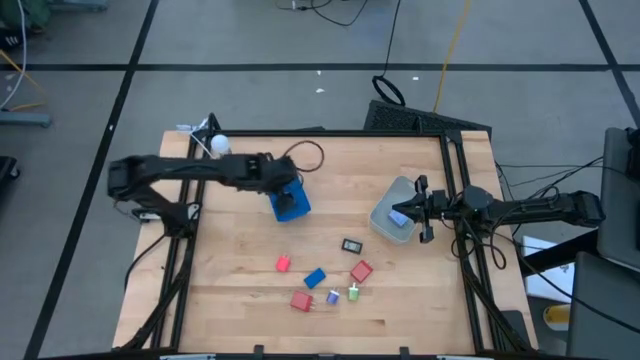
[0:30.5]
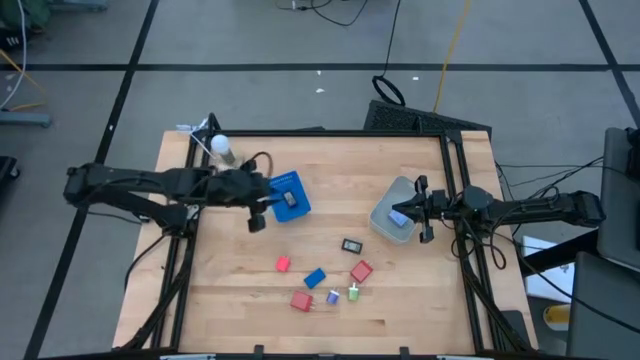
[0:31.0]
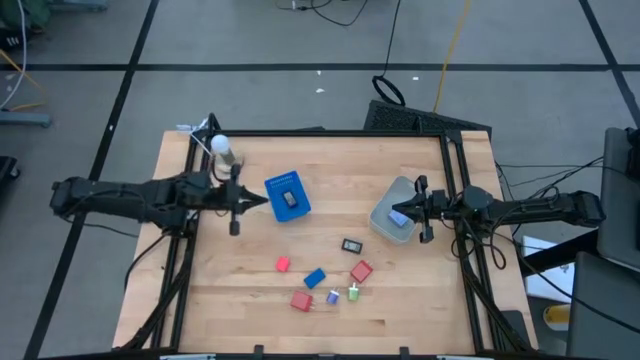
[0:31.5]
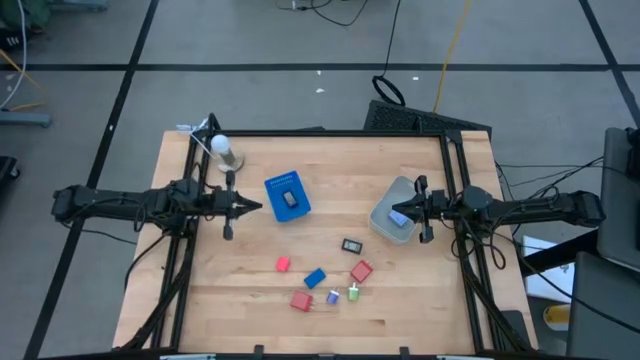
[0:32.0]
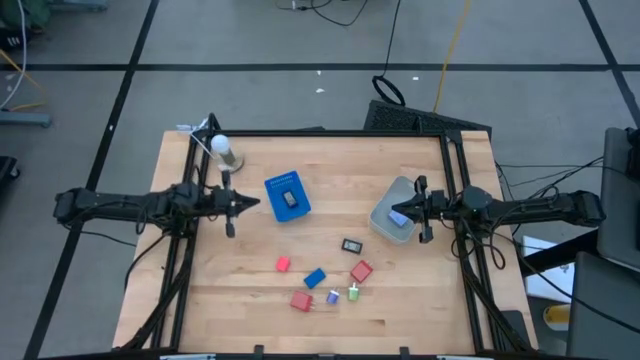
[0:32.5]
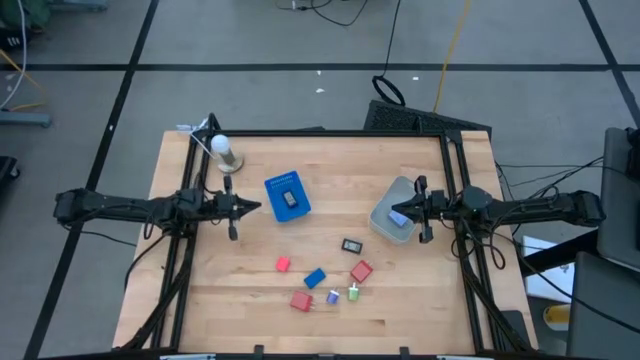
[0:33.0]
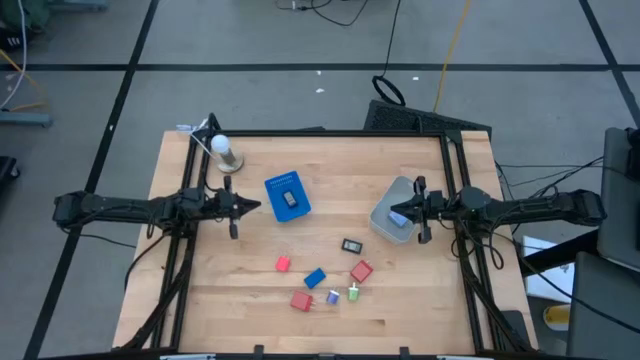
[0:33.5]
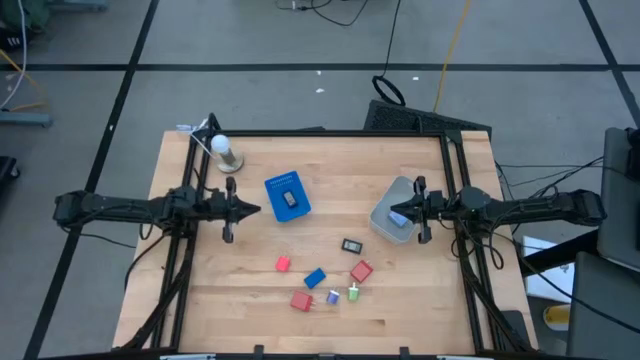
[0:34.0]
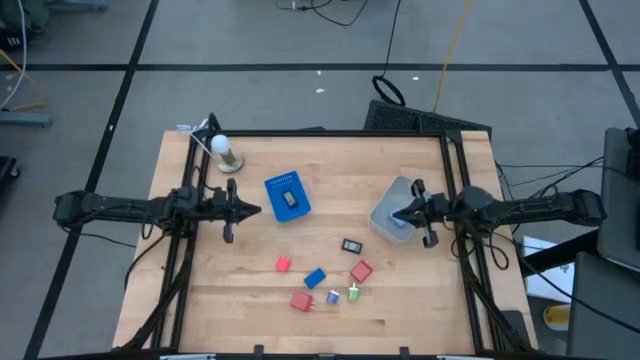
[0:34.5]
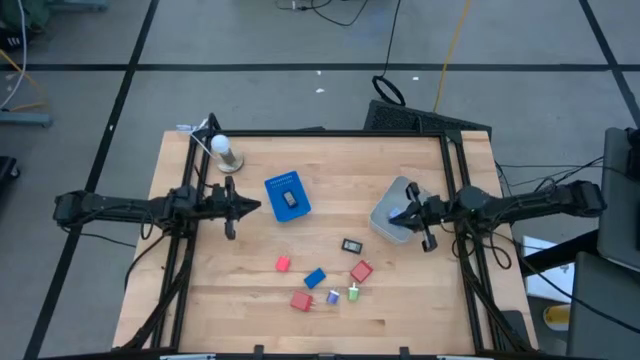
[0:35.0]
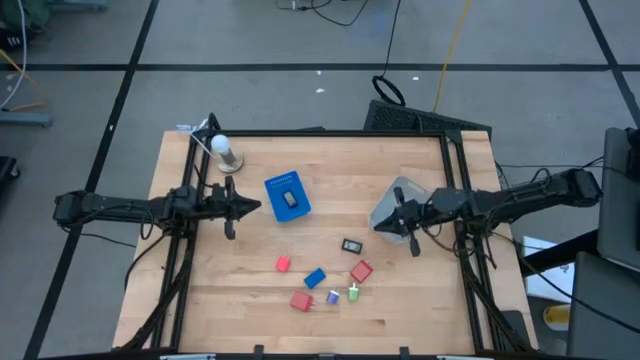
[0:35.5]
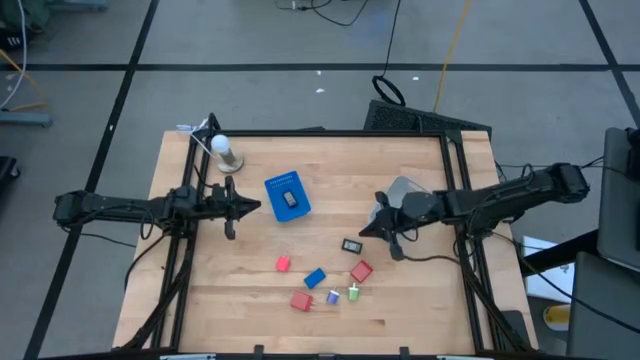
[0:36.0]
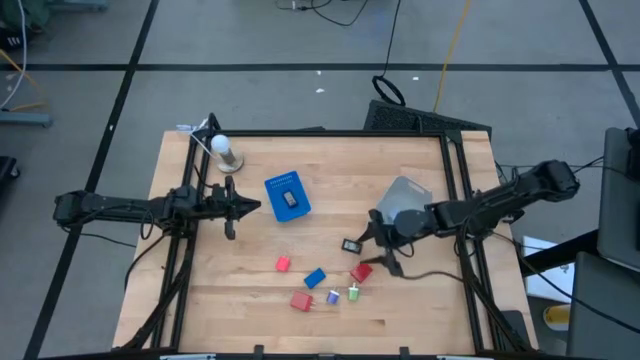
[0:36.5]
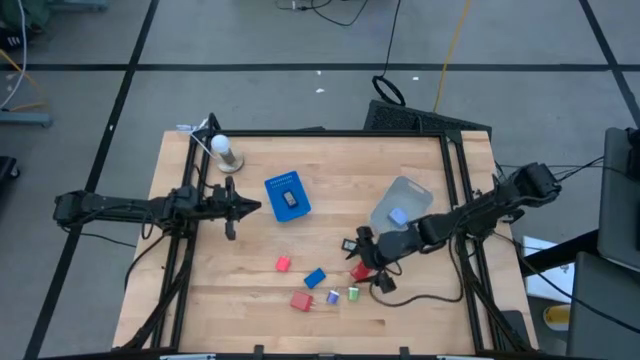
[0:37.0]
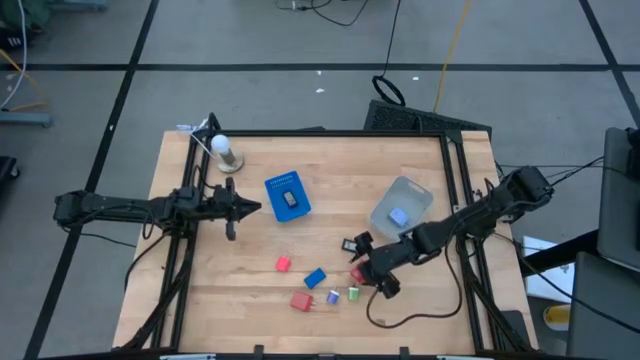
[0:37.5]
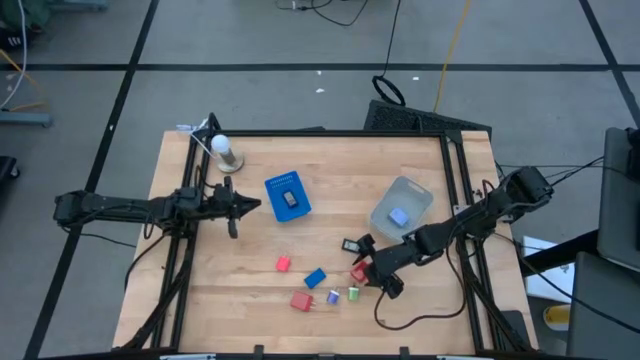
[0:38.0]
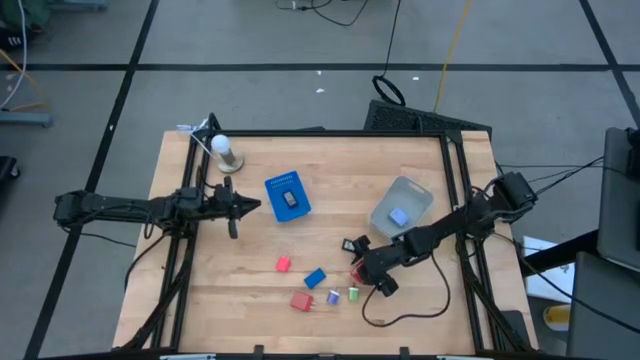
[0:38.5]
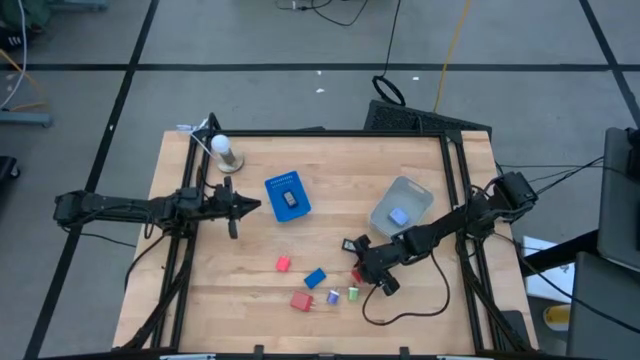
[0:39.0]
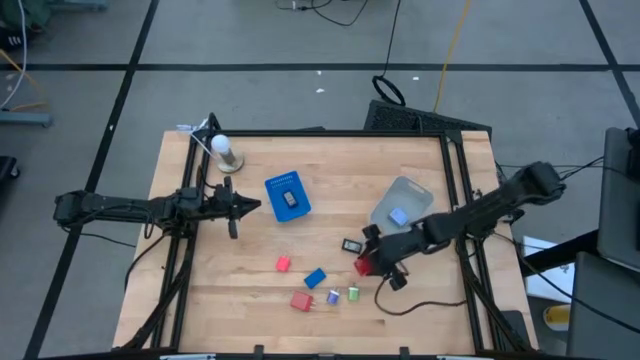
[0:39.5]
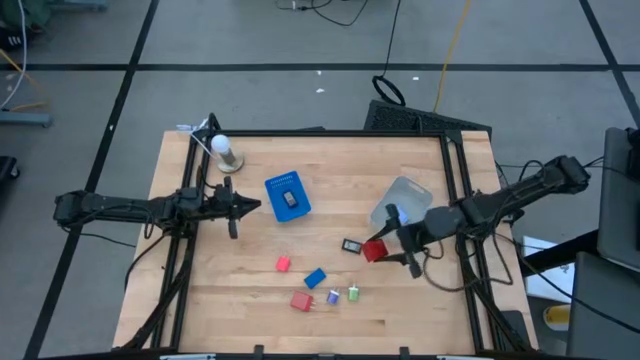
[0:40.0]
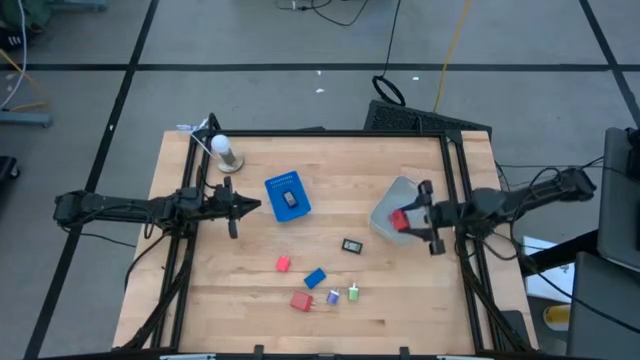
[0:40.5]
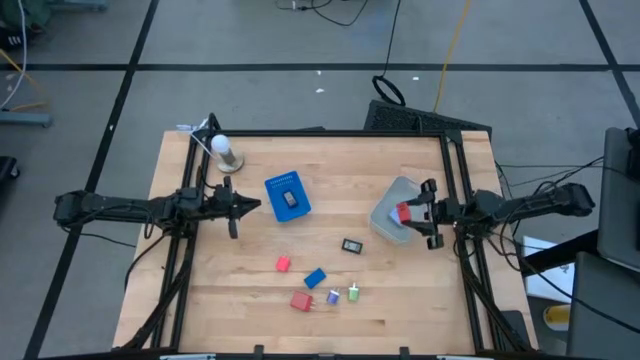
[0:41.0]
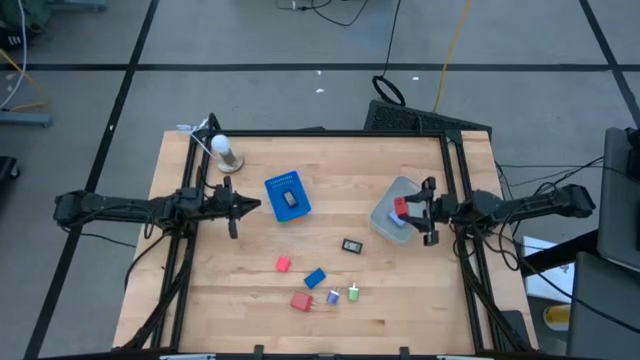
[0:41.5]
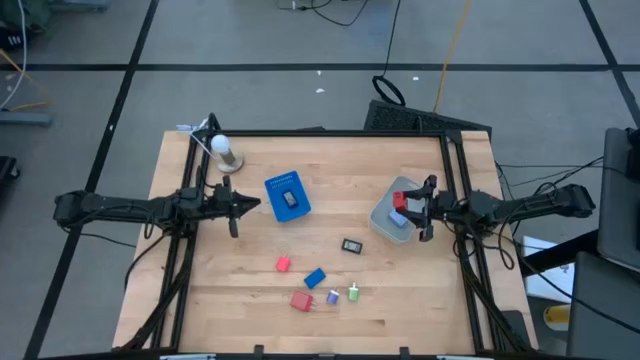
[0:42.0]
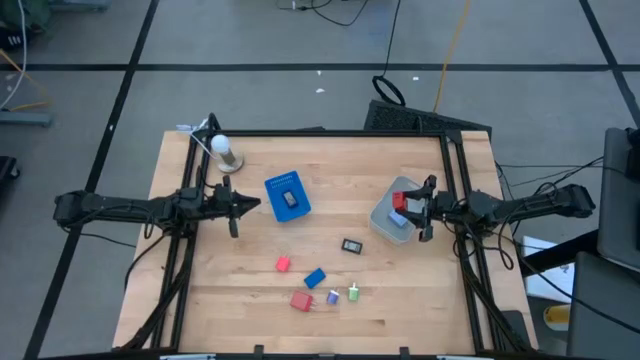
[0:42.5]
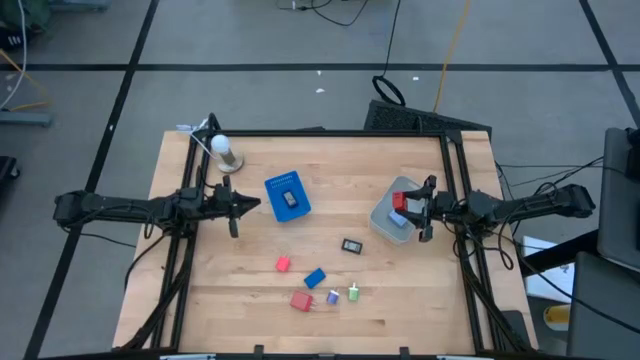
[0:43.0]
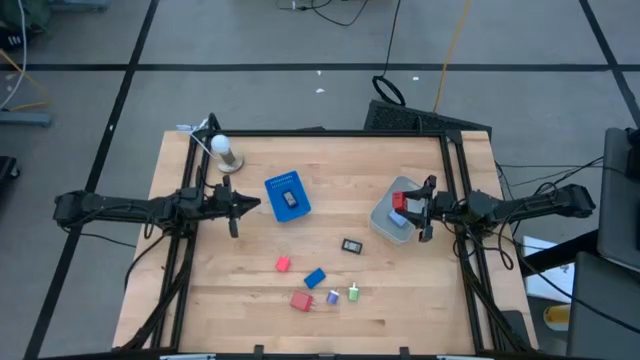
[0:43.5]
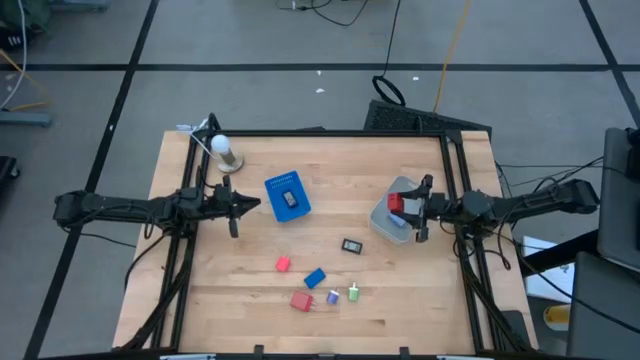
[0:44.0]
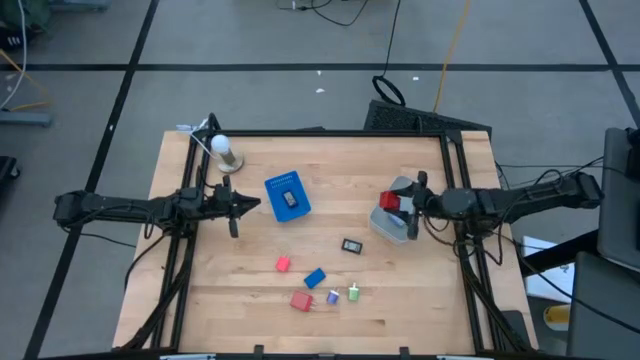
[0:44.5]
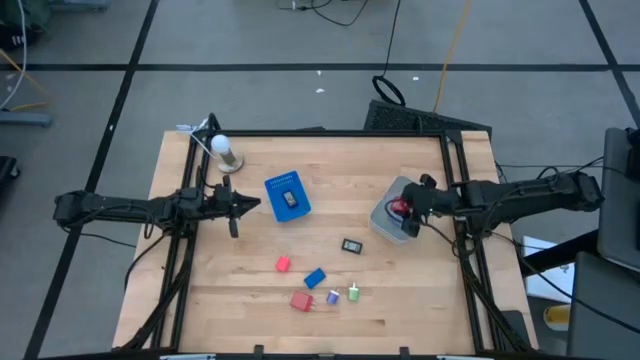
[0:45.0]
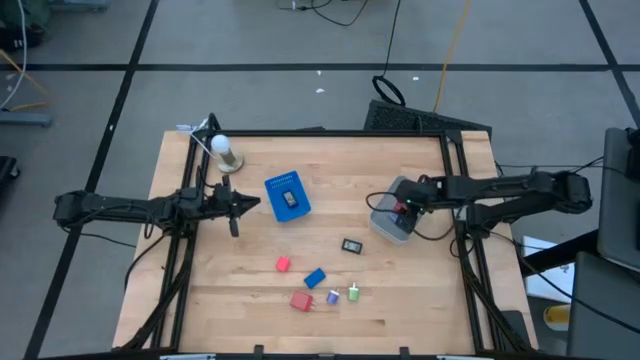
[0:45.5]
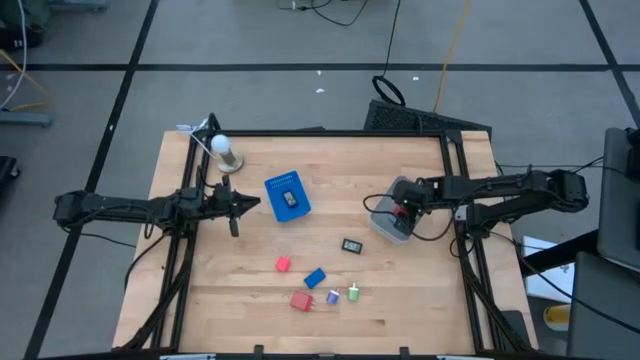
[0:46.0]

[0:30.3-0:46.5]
Task: Pick & Place Office items
Put the right red charger adapter into the gray bin

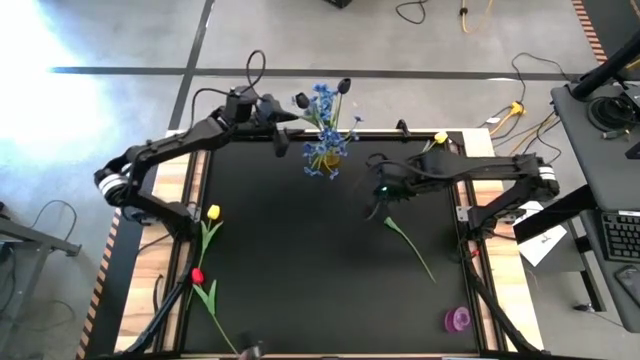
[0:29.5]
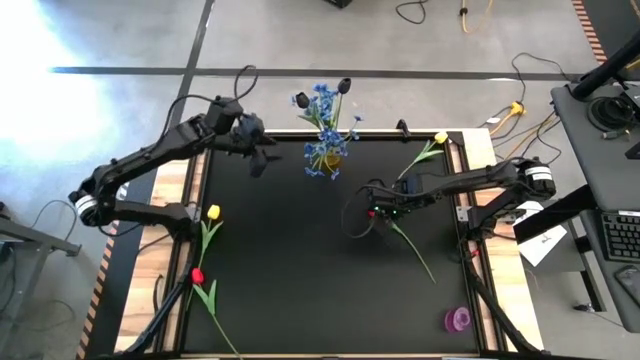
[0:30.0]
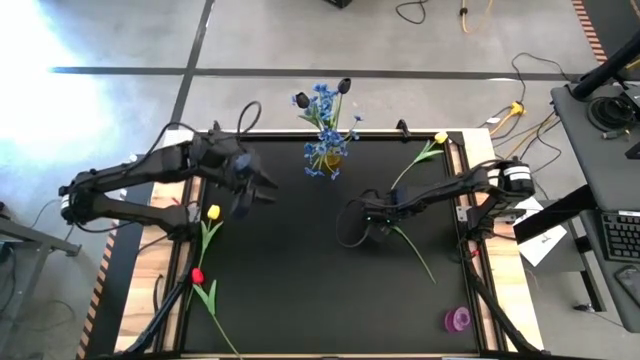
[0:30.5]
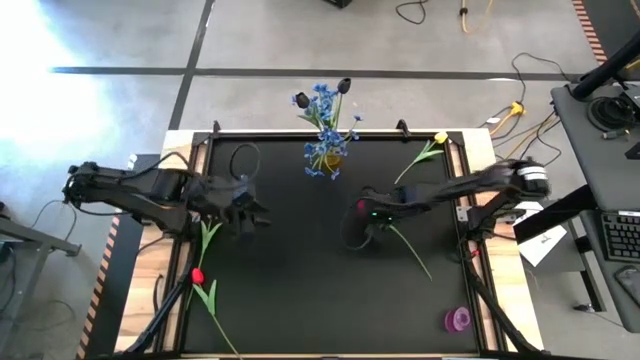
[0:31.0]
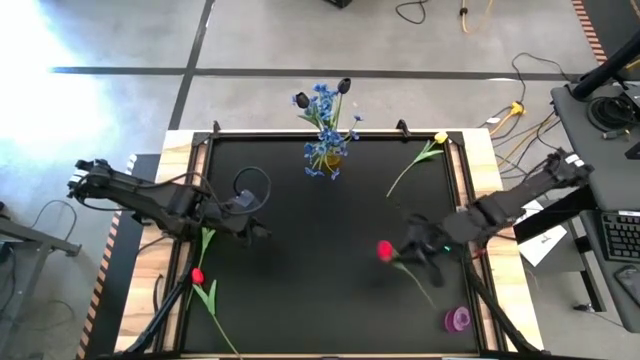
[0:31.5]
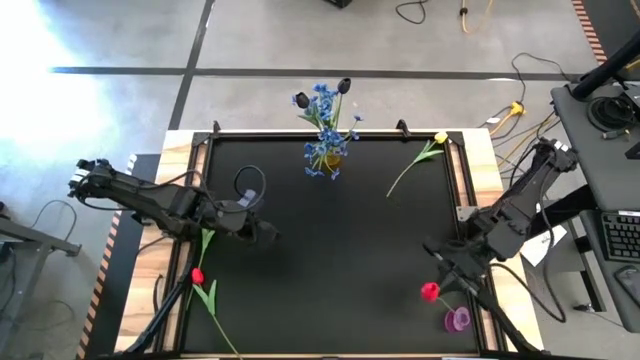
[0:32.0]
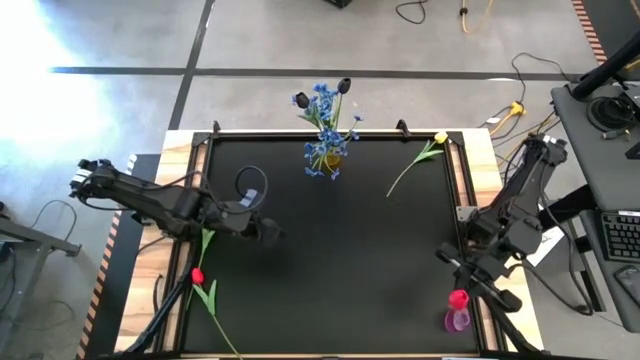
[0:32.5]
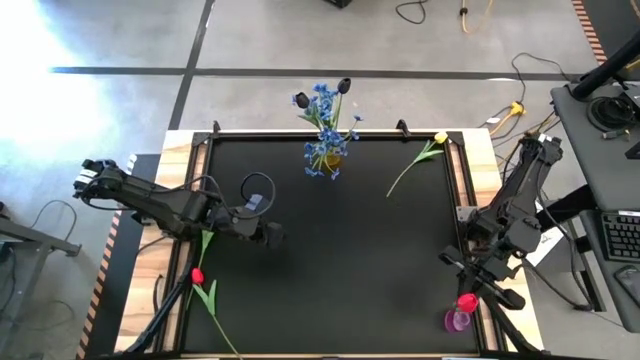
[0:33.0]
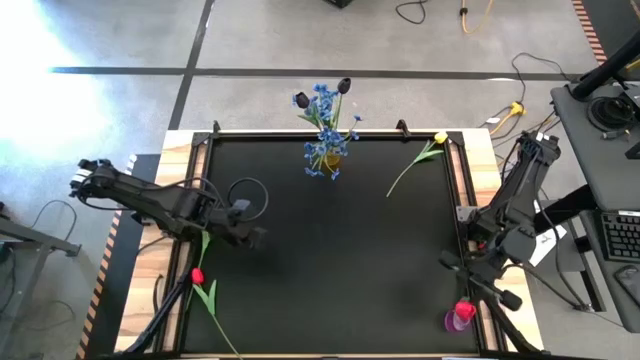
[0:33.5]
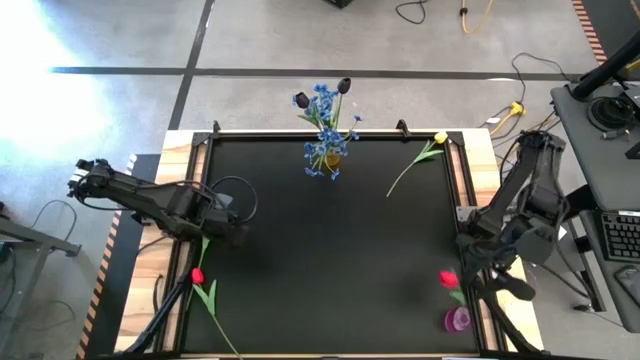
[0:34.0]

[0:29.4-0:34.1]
Task: Sort flowers into vase by color
Put the top red flower into the purple vase
